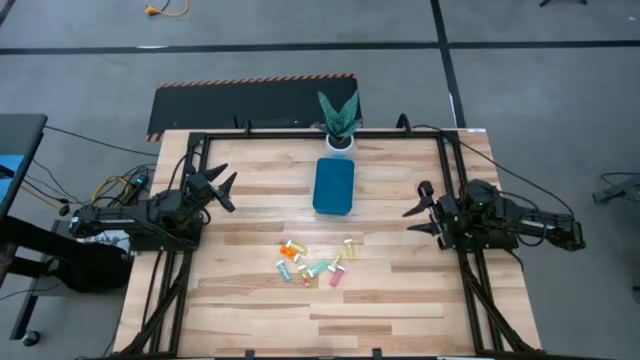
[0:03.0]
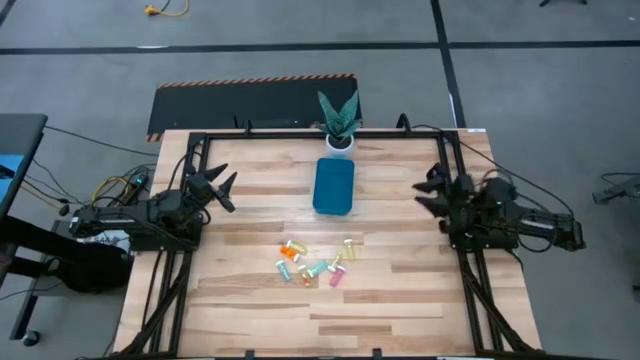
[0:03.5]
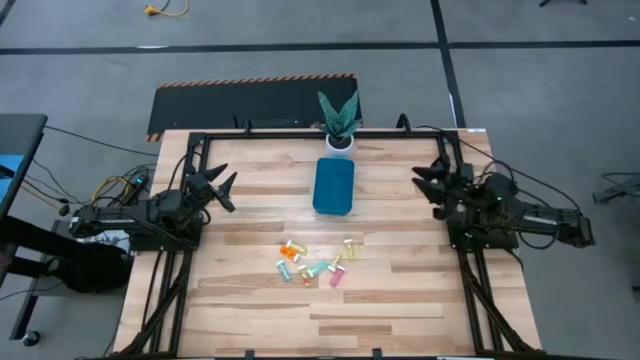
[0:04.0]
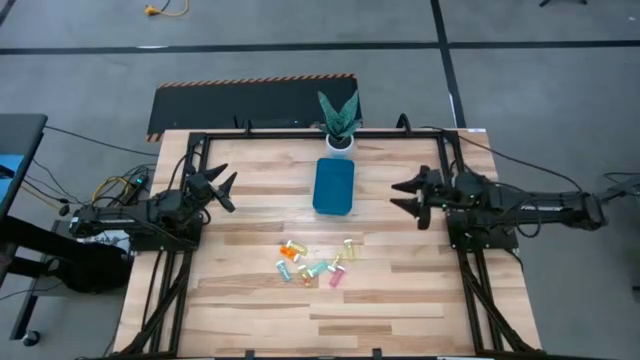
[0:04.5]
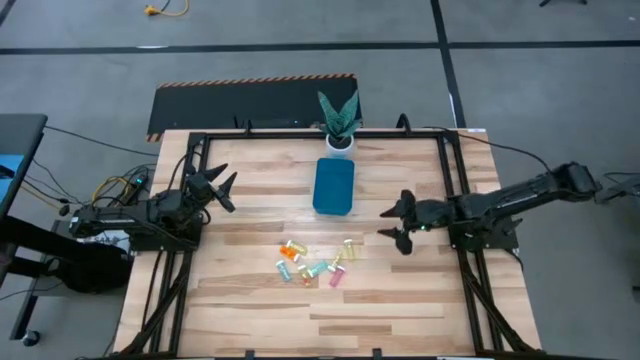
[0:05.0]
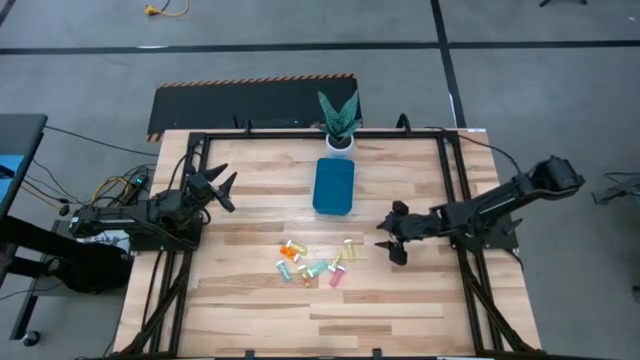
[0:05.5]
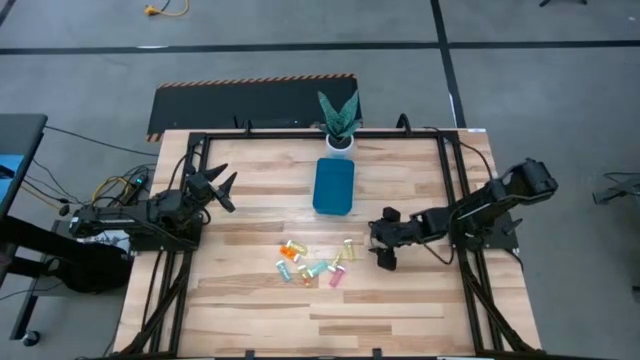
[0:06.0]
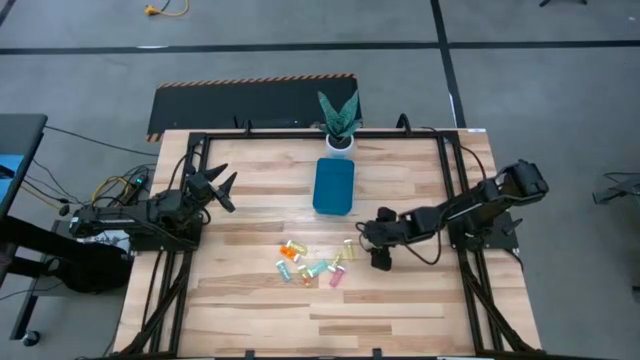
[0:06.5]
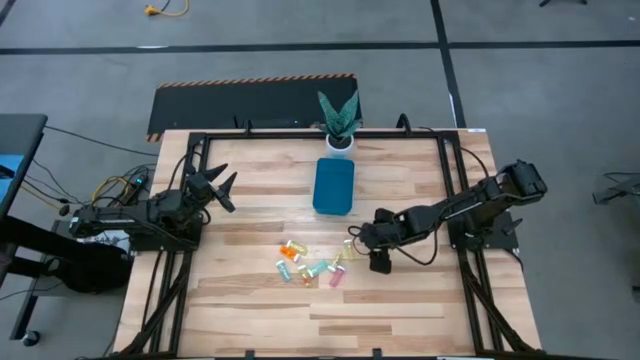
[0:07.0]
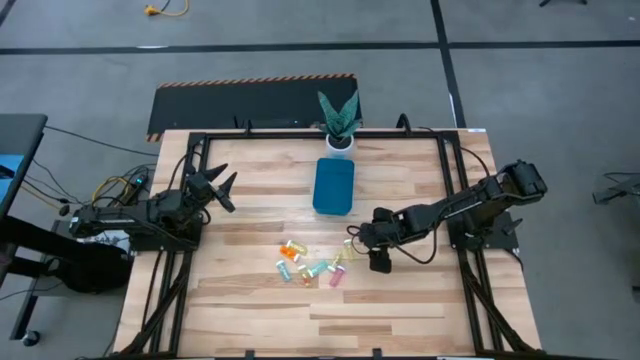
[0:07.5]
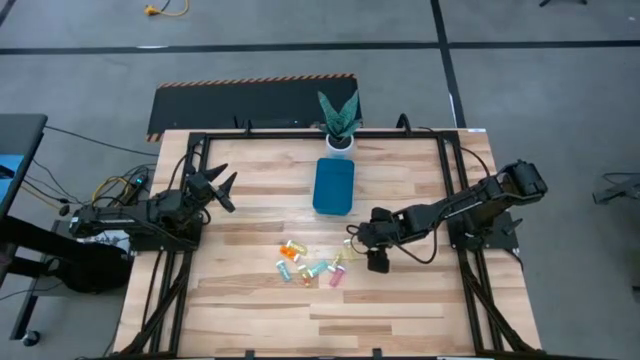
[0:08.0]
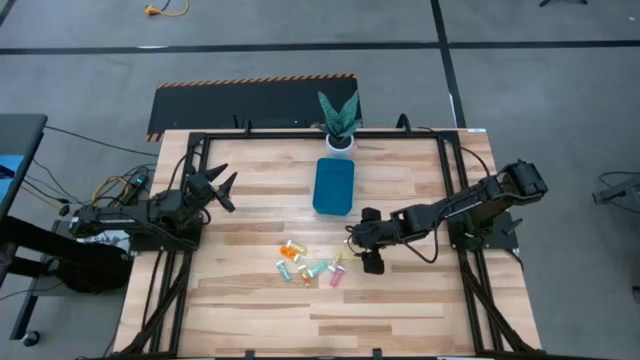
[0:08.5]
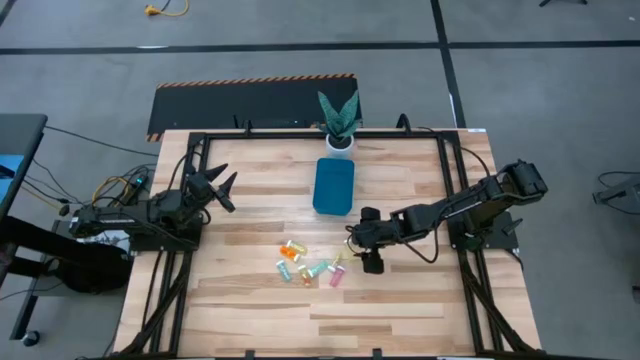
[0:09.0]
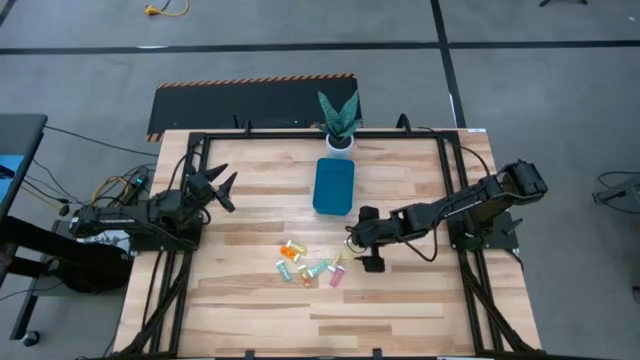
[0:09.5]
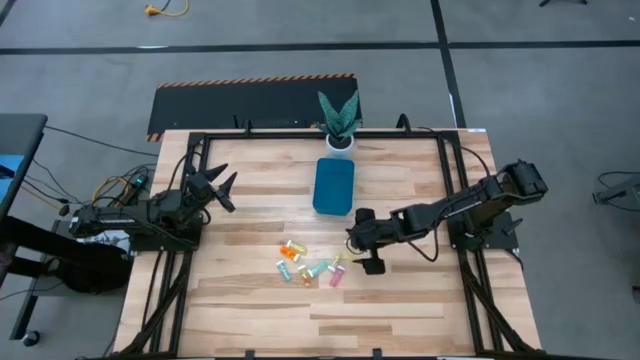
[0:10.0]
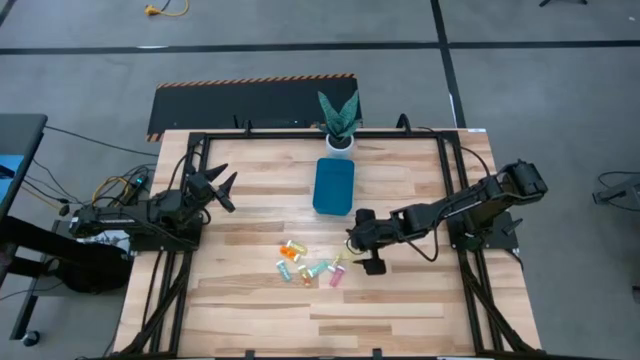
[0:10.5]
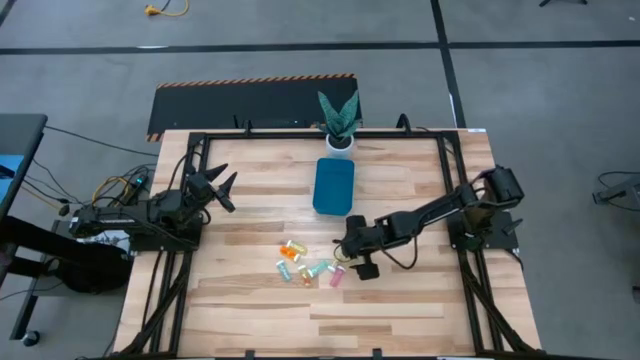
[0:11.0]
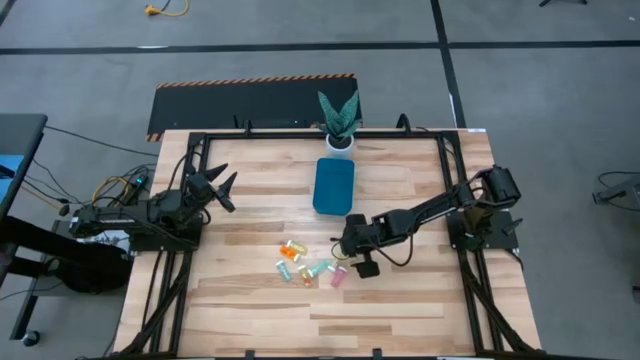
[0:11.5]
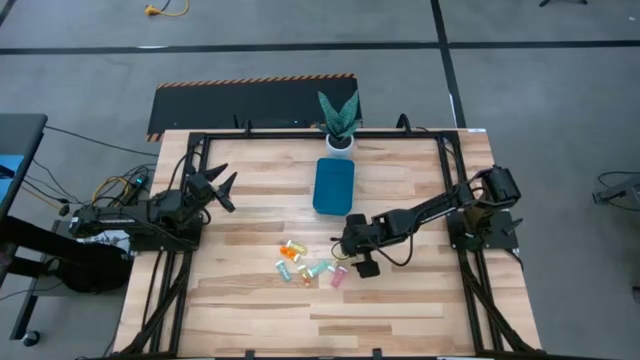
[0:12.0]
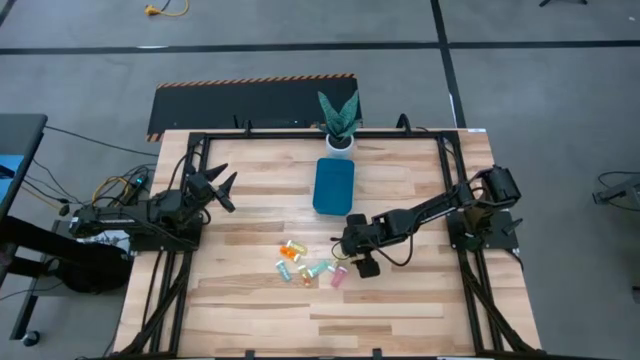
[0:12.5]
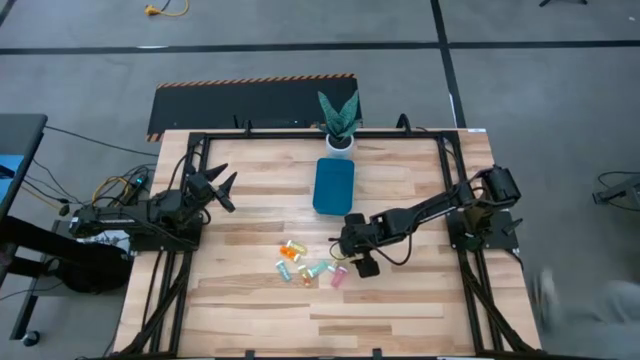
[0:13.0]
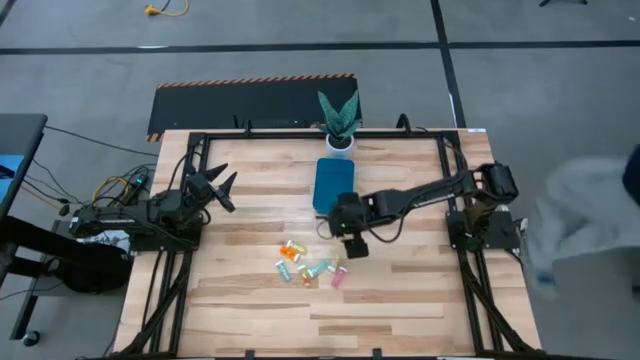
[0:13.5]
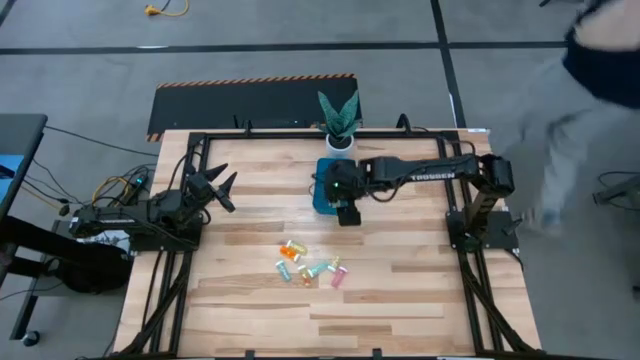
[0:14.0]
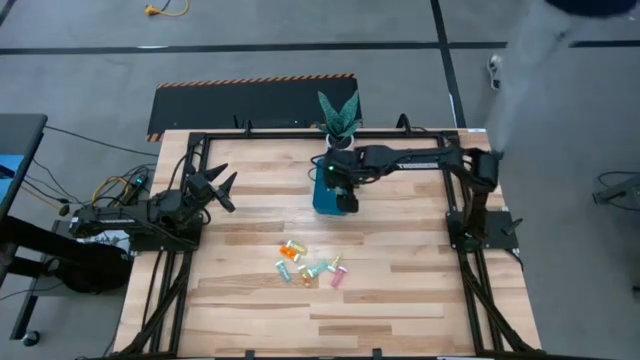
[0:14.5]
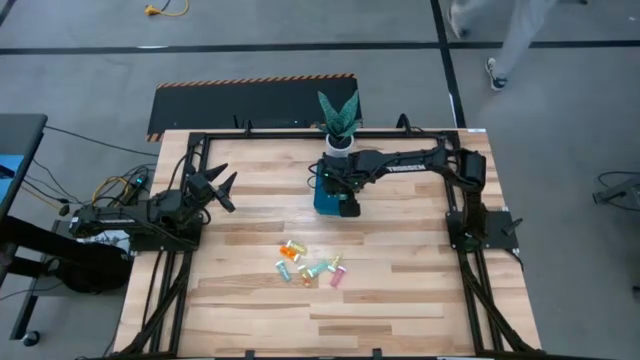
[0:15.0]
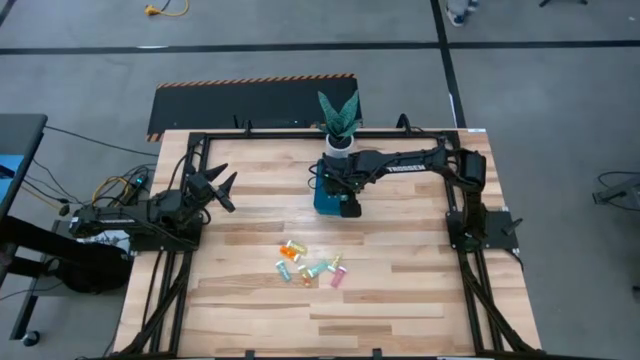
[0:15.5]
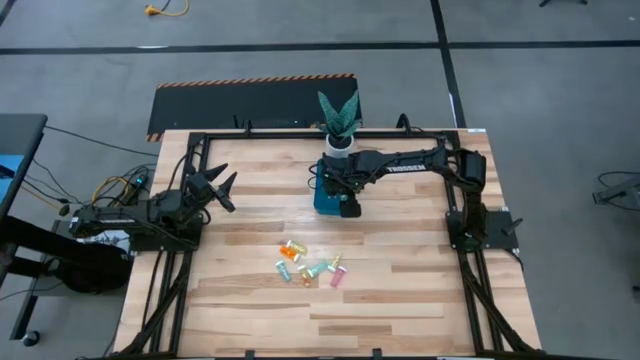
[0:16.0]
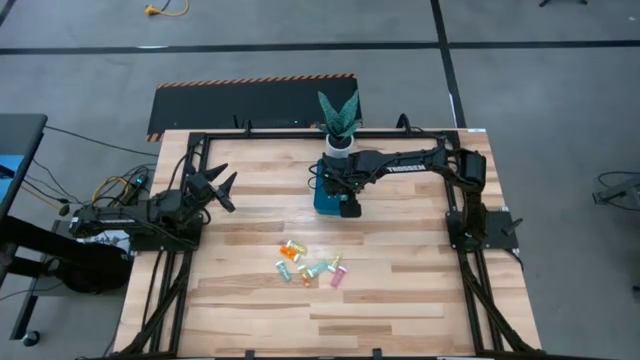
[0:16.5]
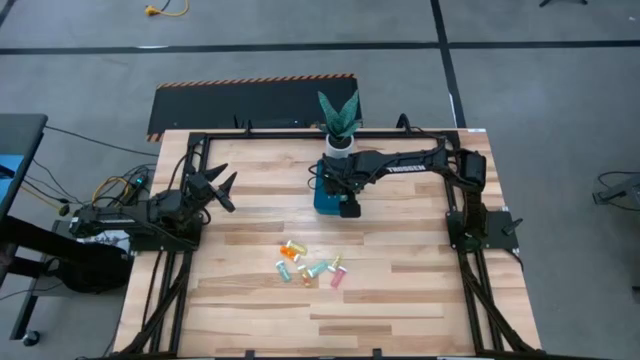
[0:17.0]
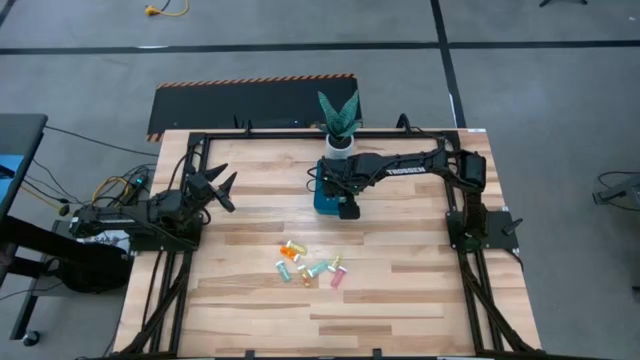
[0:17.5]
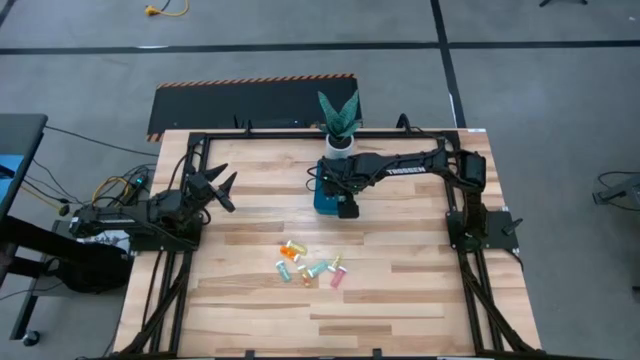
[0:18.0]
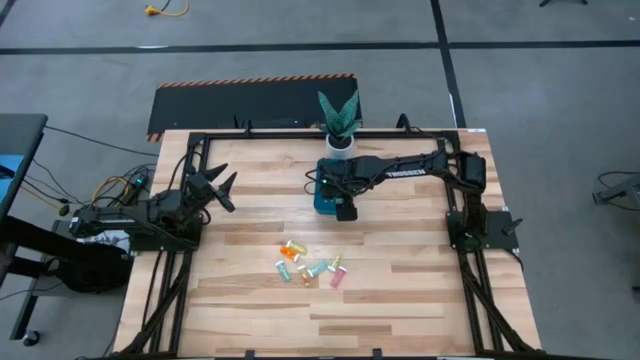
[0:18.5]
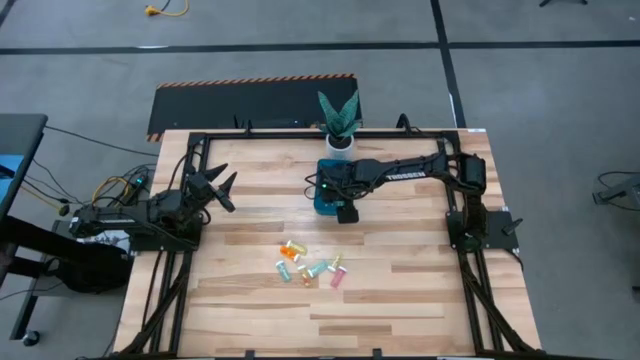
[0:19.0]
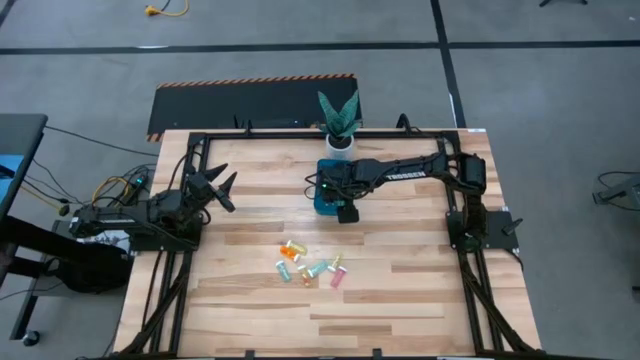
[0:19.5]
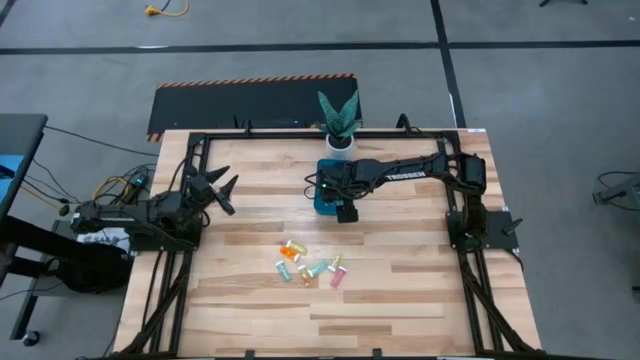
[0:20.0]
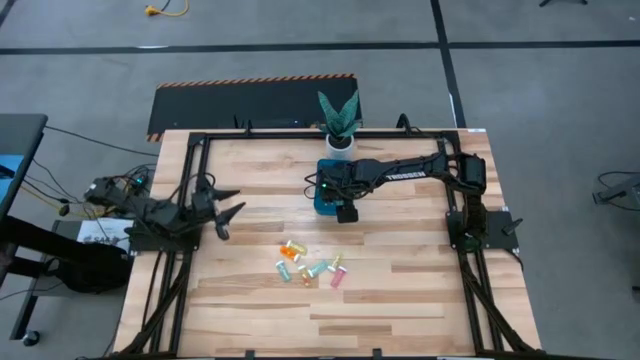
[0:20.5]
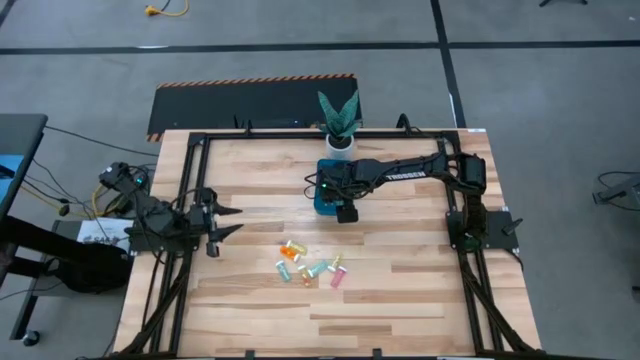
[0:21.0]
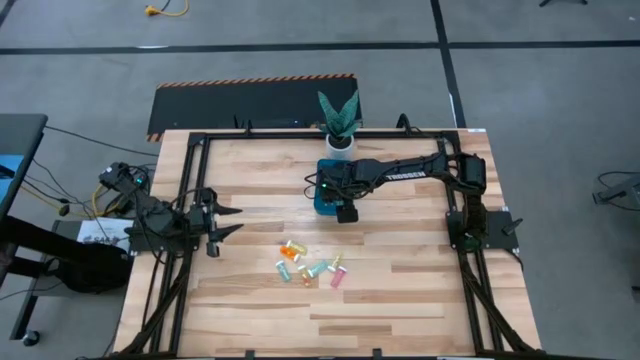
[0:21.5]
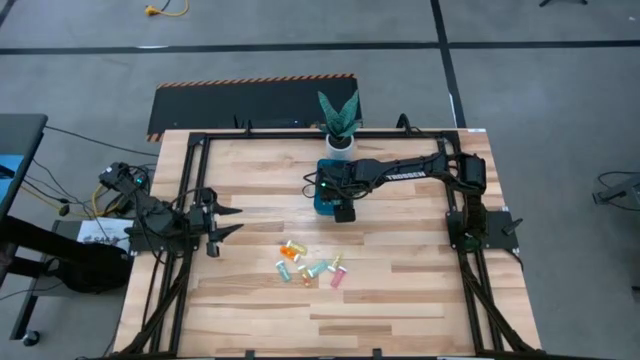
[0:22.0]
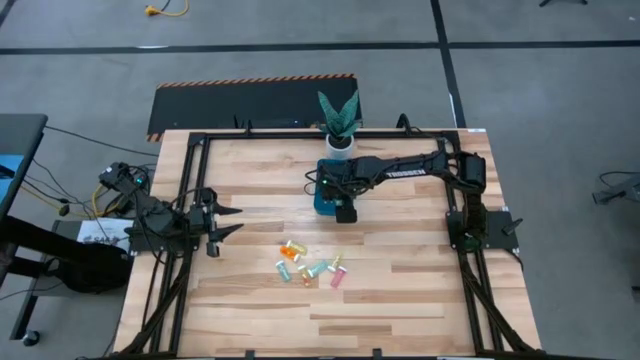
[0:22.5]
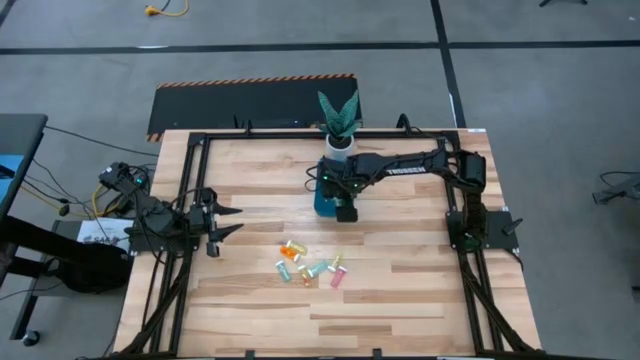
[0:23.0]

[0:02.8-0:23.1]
Task: Pick and place pill bottles into a basket
Put the yellow pill bottle into the bin
